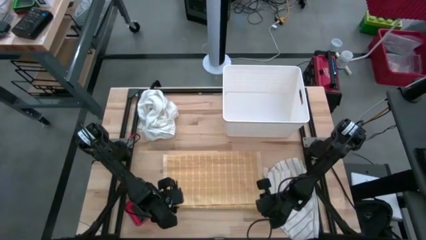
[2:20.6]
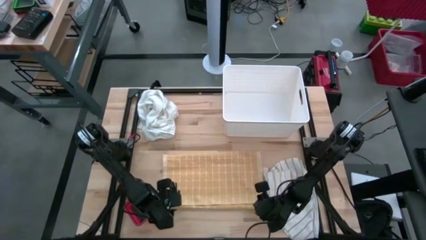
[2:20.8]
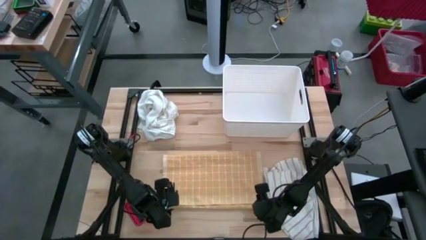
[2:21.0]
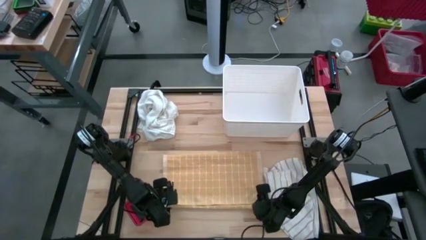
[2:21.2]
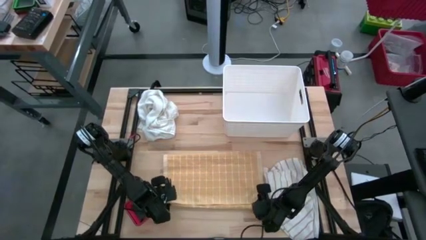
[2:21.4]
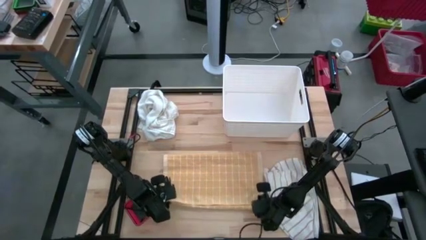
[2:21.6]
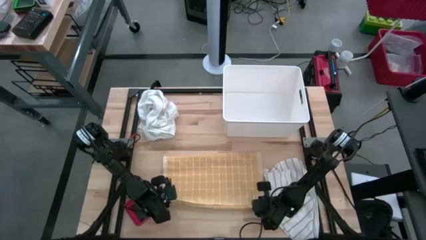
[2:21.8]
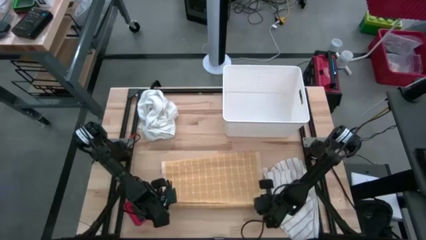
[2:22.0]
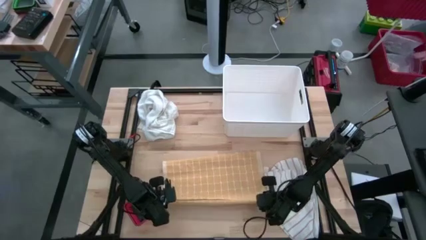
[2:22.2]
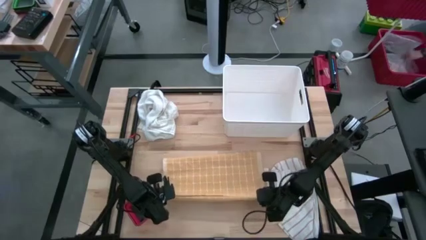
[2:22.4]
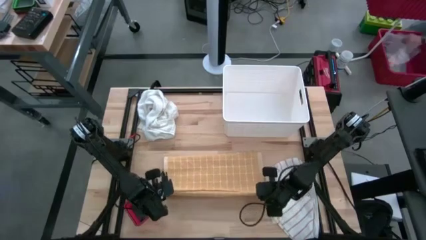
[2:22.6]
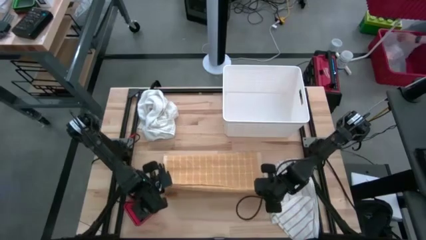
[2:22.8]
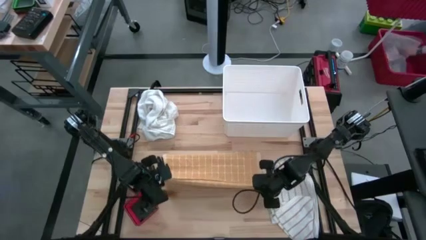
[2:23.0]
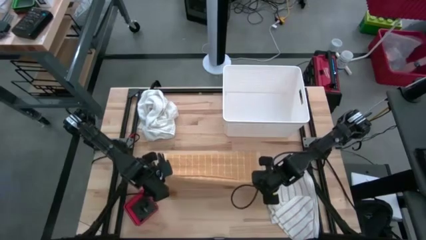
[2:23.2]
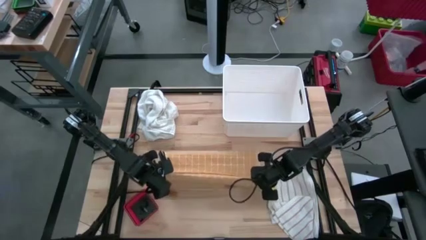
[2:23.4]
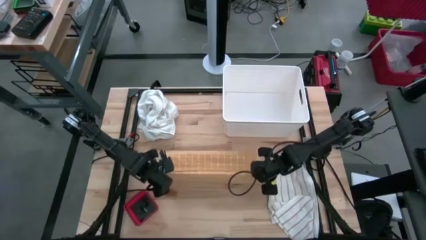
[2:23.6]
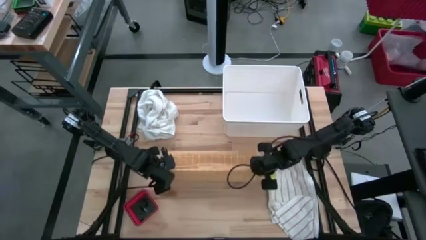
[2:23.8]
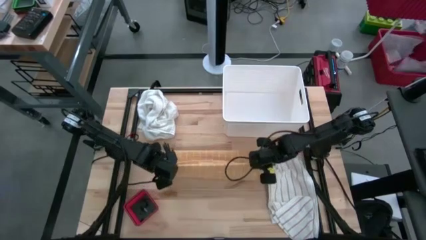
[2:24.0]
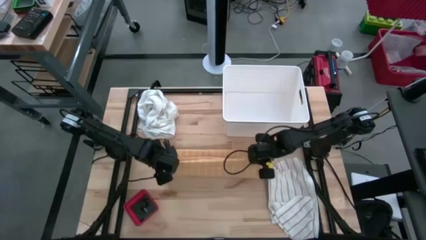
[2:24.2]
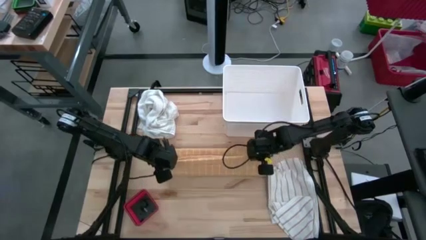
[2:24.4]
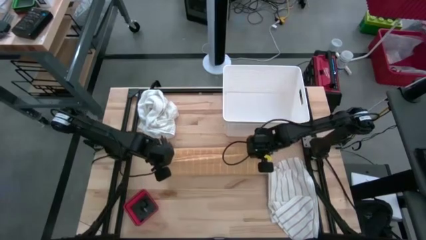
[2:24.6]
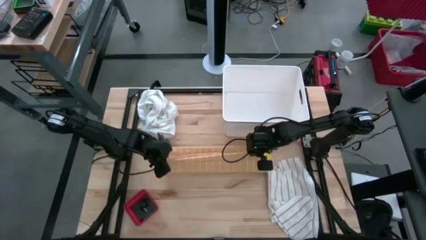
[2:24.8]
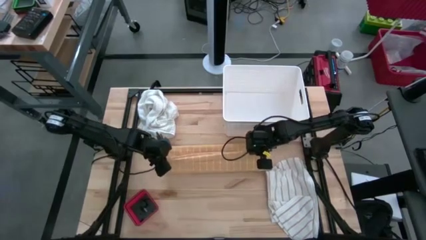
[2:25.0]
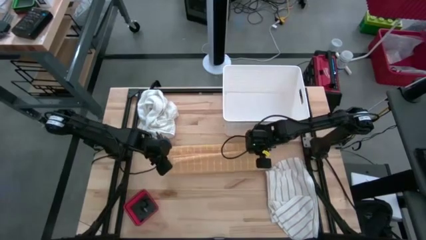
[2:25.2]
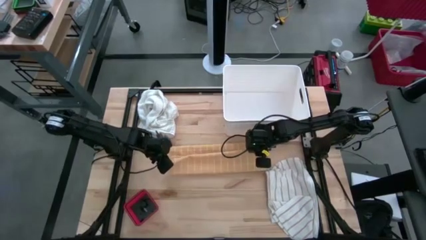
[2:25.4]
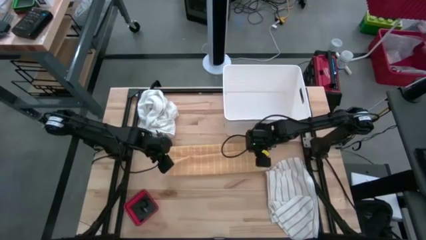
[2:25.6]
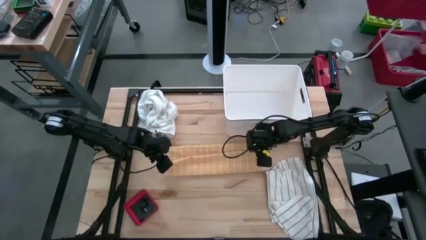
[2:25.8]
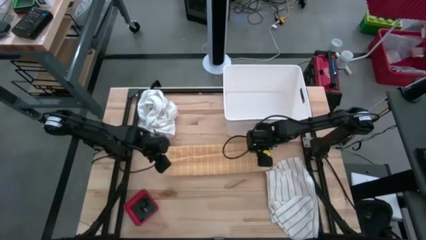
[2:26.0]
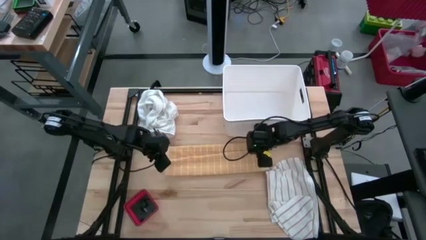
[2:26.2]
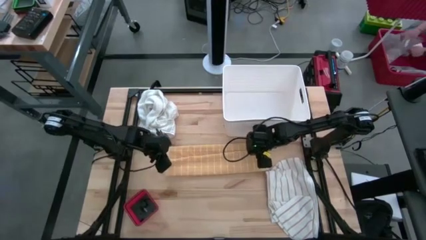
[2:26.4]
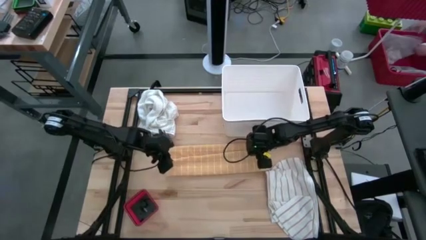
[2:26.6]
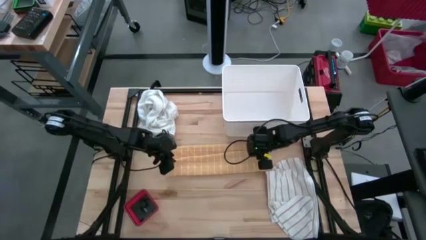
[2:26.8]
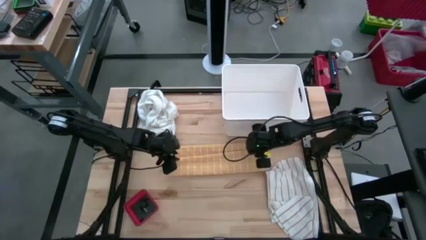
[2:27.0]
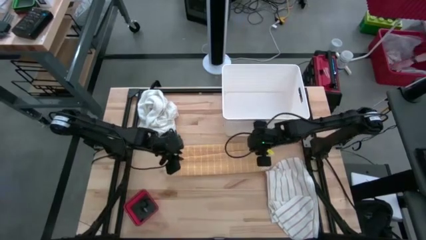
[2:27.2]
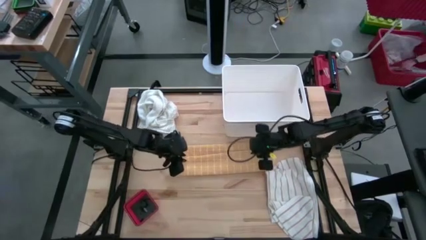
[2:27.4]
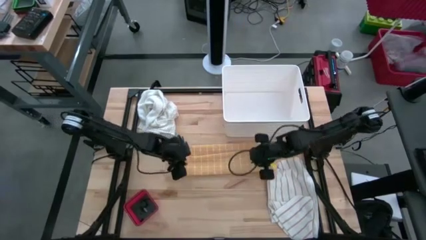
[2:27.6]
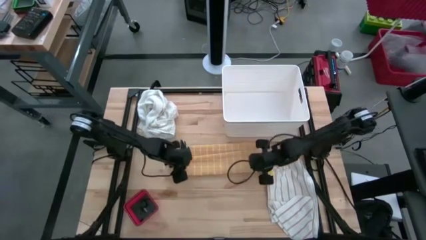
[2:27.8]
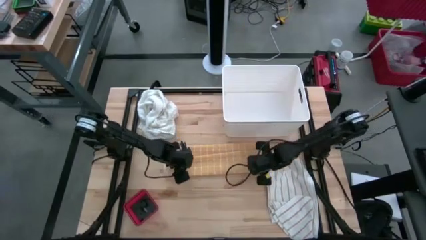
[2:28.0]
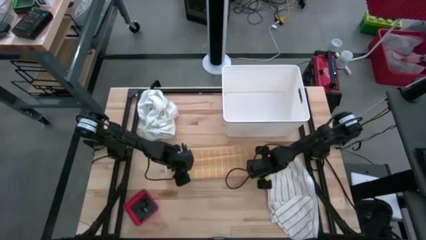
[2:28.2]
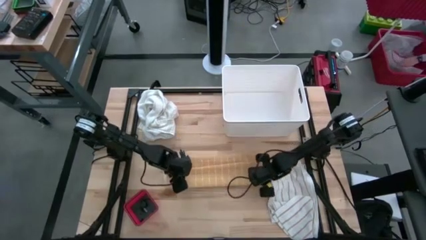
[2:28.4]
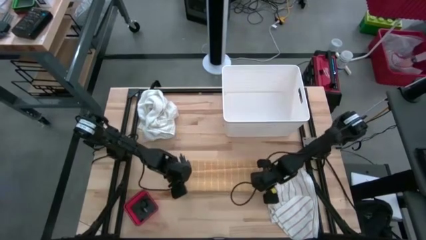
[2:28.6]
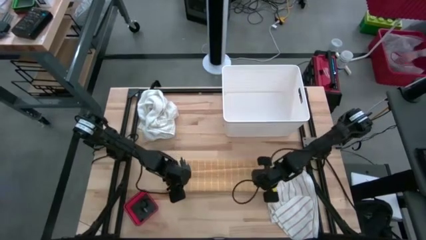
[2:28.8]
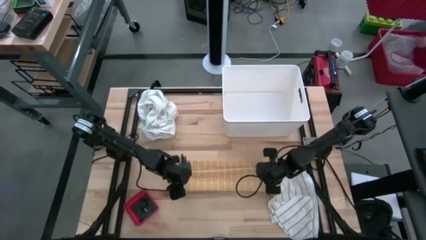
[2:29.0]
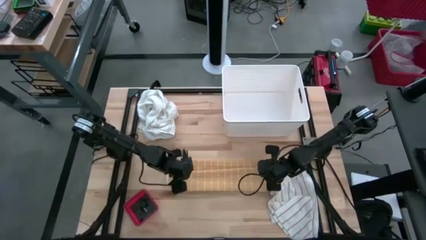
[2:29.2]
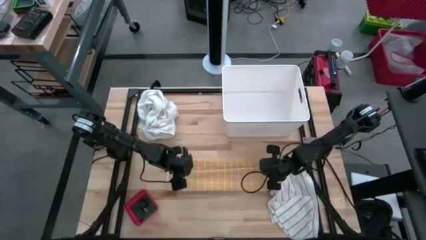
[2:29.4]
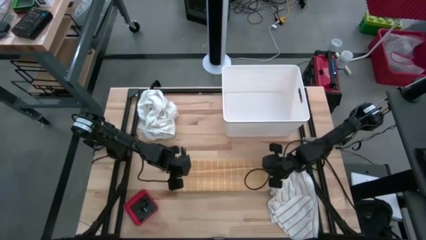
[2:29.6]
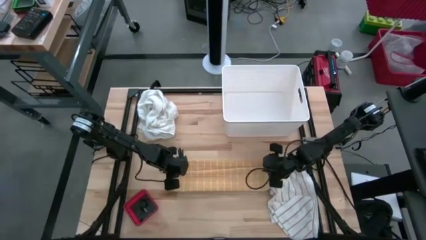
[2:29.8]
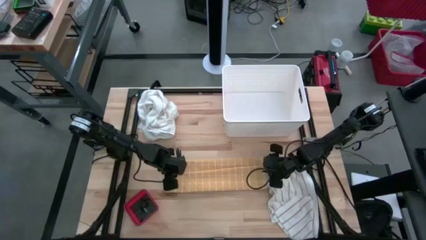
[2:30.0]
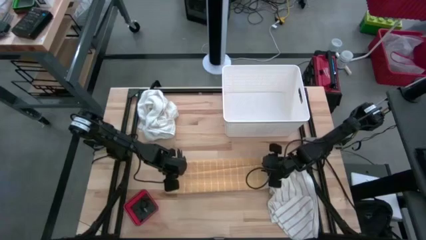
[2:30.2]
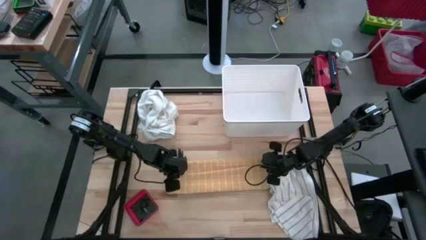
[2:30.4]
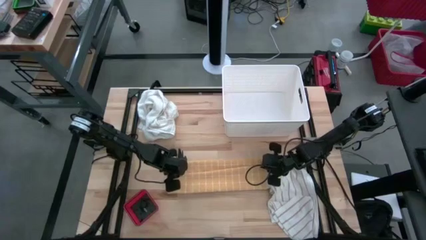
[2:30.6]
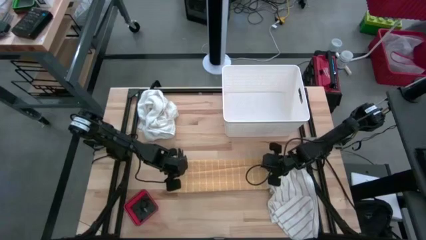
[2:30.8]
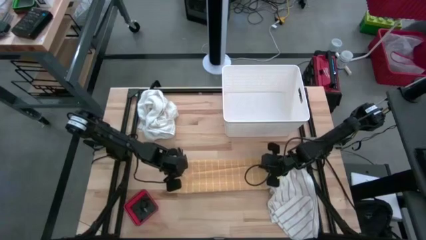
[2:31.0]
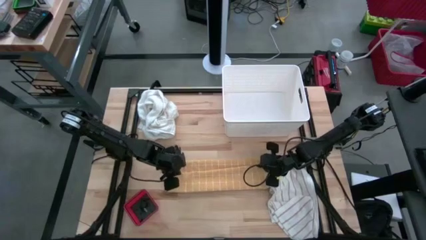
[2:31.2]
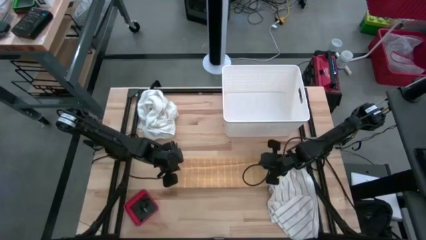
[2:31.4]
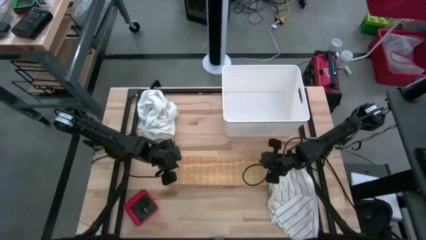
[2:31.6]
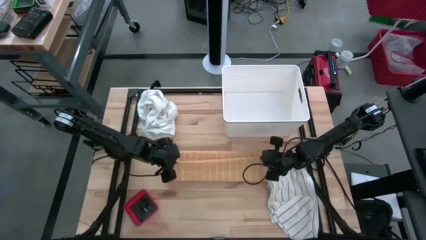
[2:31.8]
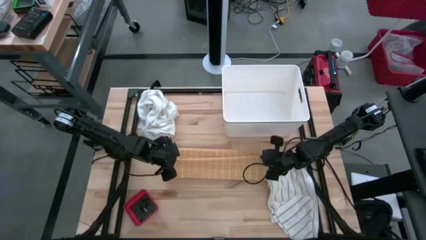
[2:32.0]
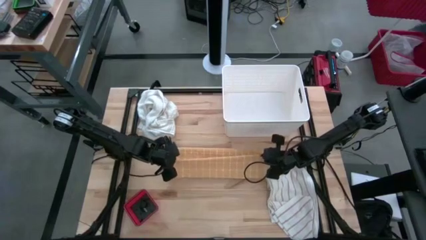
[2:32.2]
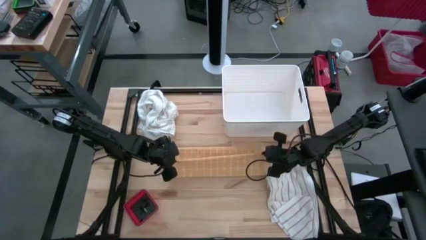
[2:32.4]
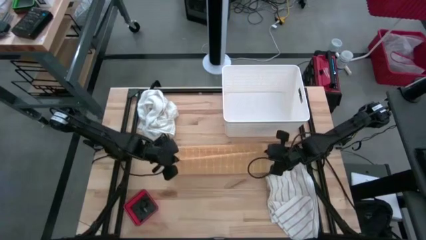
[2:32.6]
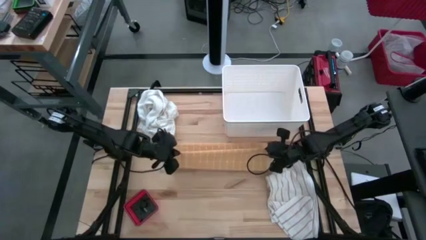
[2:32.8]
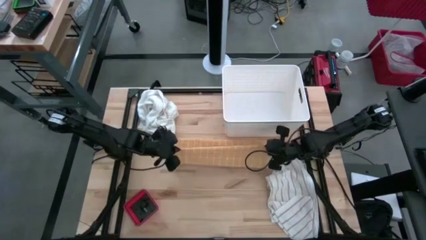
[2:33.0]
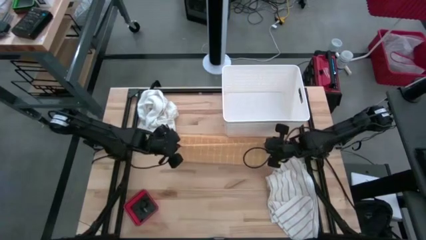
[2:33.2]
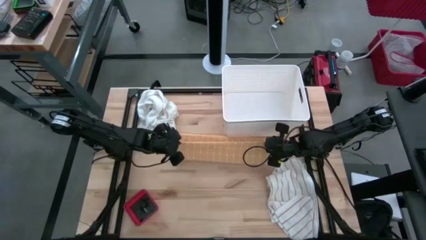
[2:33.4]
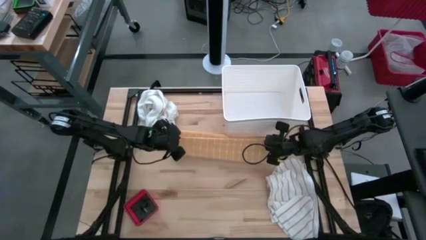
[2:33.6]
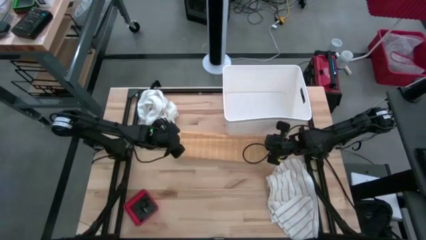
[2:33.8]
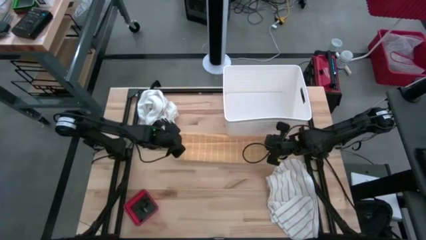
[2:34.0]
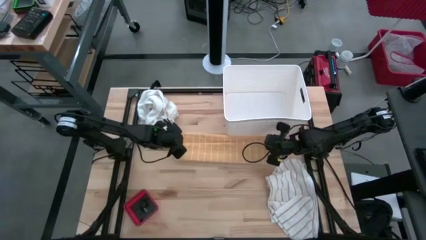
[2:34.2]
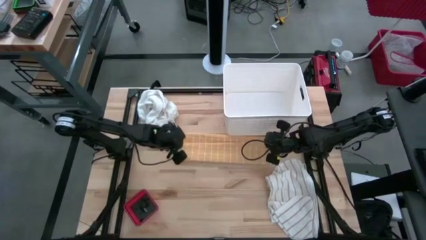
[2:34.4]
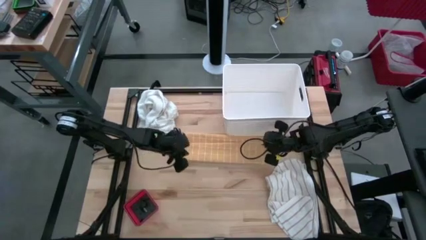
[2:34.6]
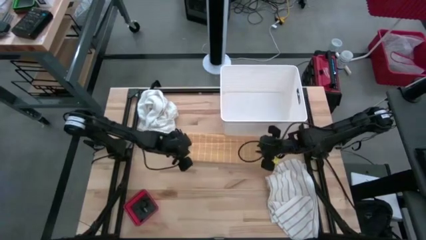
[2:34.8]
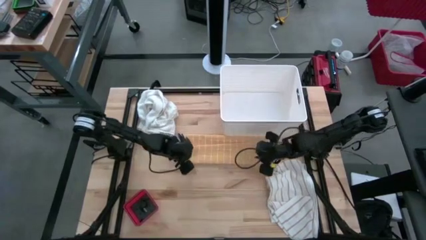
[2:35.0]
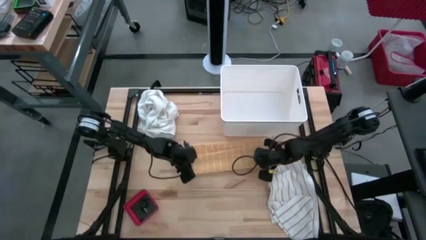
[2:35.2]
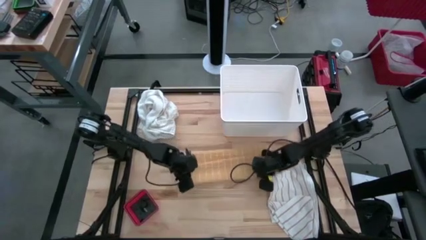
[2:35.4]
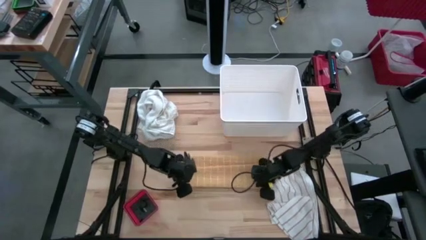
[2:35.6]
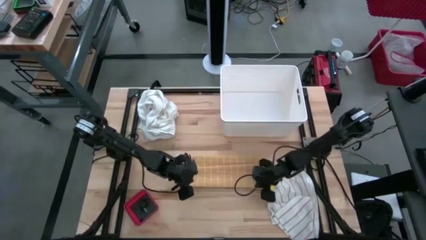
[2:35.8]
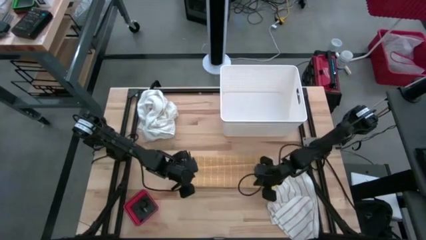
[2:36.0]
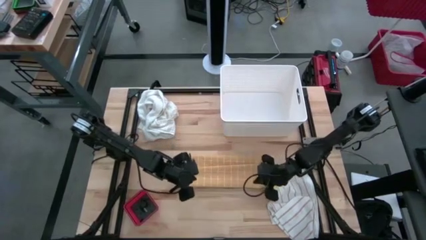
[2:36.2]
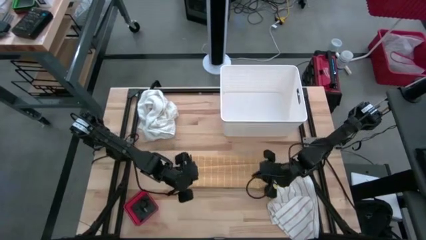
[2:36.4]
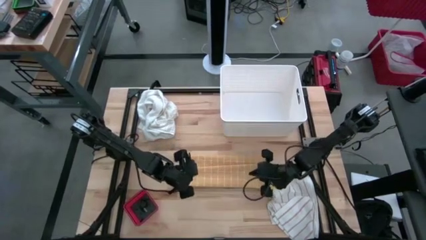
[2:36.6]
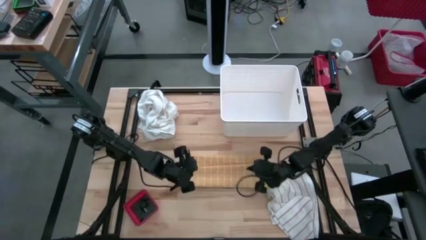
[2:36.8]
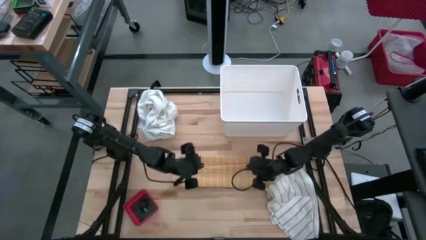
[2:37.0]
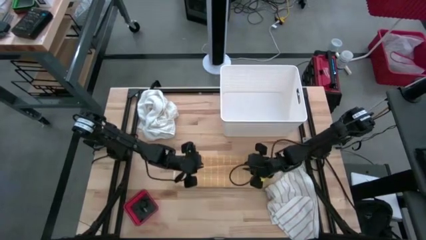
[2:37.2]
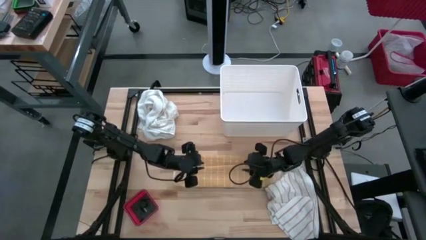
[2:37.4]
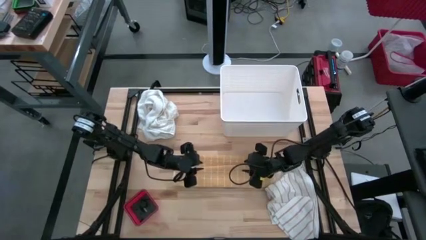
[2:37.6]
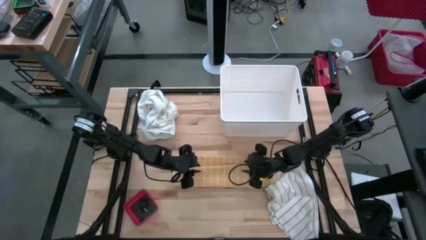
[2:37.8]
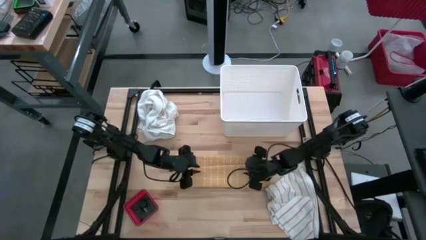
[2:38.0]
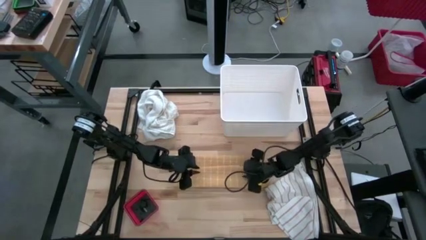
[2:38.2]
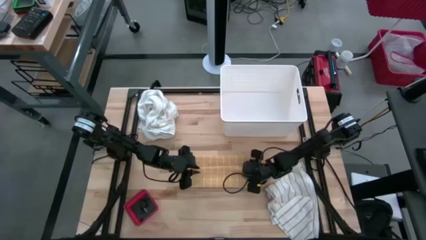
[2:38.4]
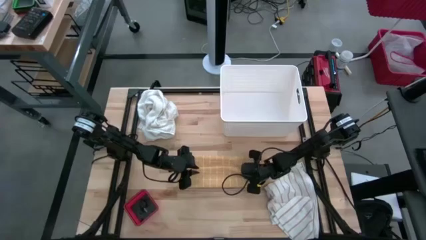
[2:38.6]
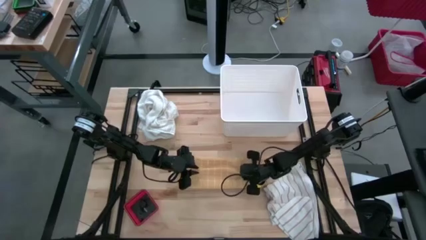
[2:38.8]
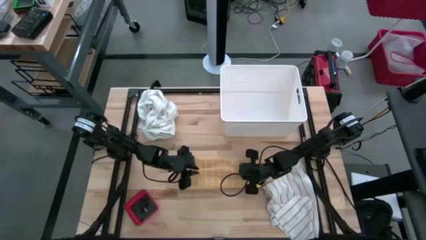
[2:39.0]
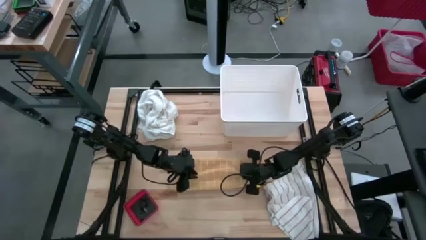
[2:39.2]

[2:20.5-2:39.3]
Task: Fold towel
Fold the yellow kitchen towel
